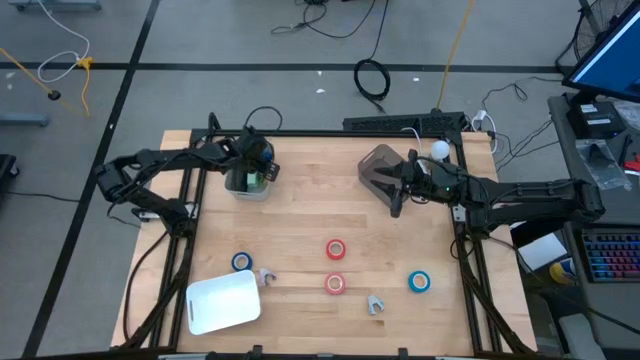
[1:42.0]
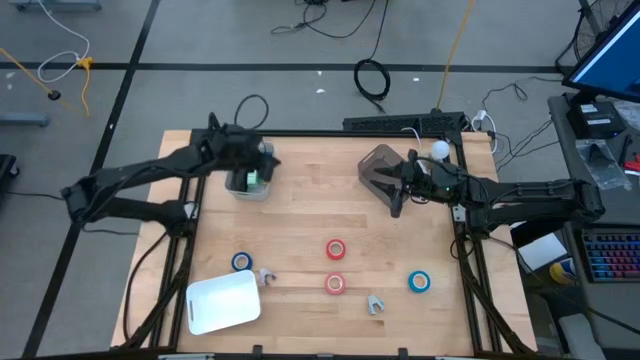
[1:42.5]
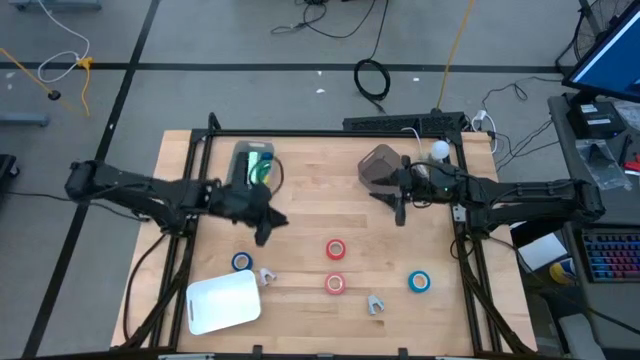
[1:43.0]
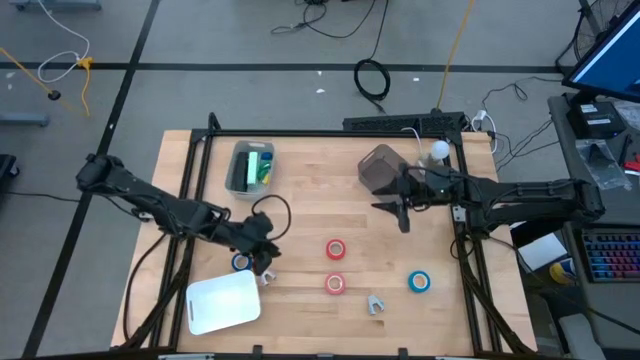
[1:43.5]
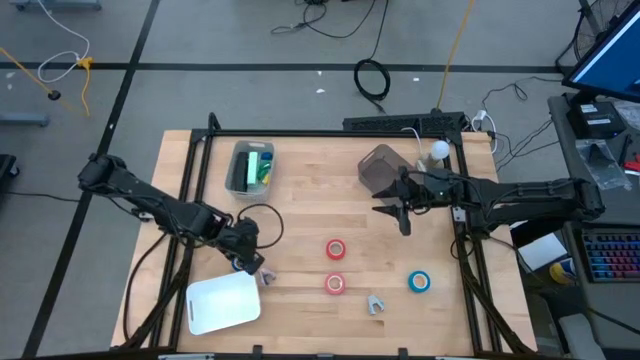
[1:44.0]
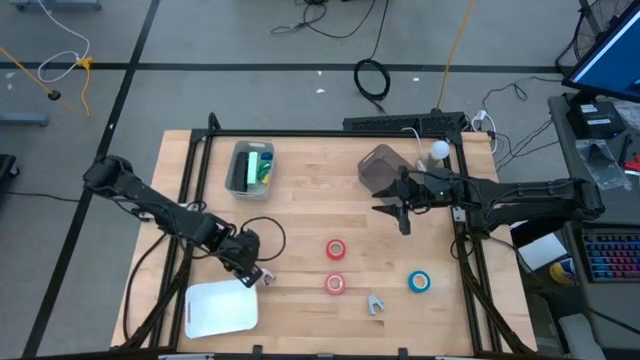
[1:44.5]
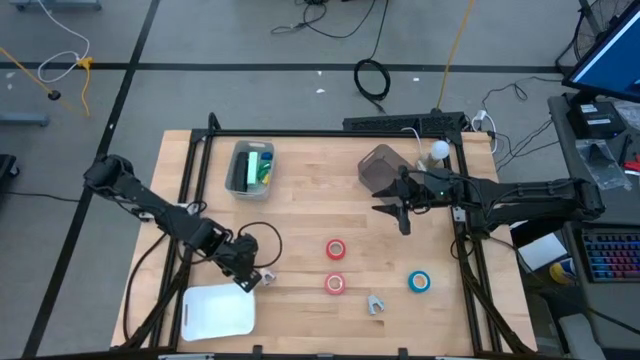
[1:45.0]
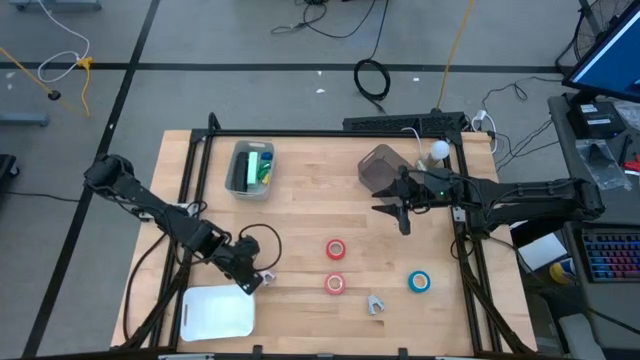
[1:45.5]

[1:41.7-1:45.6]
Task: Pick and place Stapler, Stapler remover, tape
Adjust the white bin

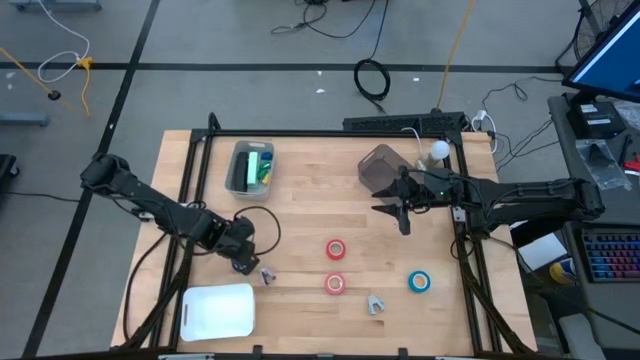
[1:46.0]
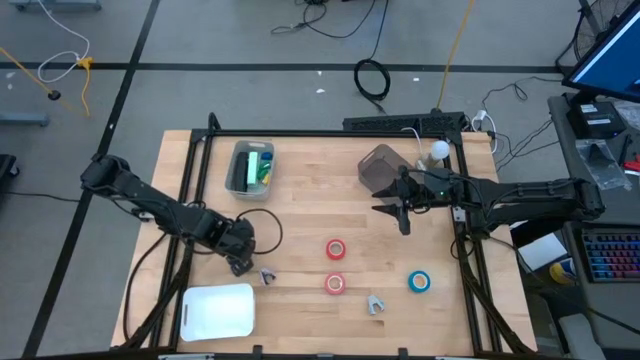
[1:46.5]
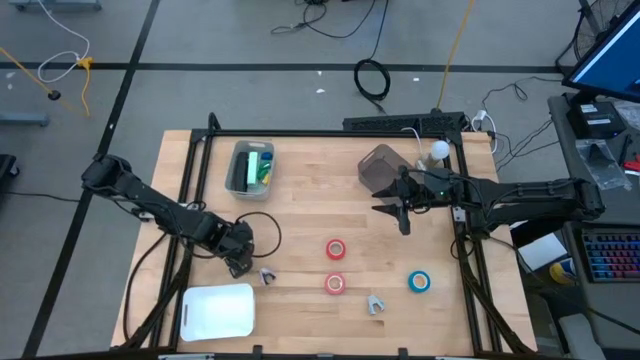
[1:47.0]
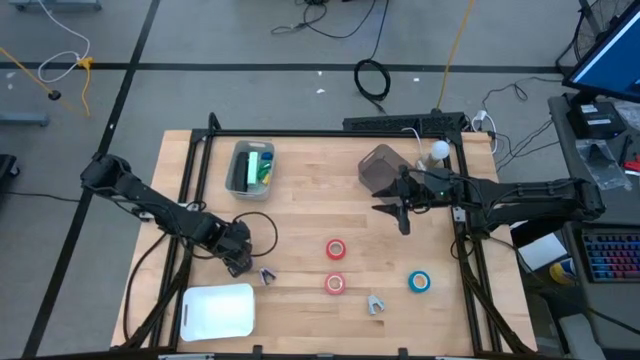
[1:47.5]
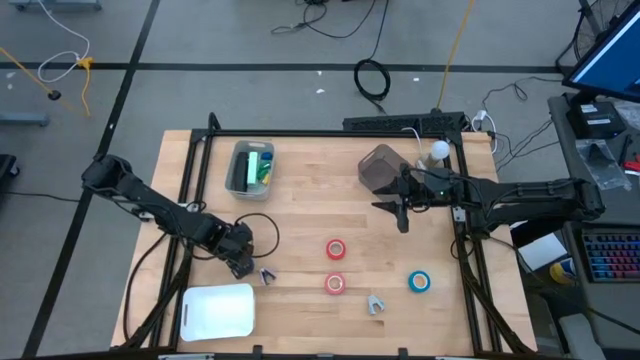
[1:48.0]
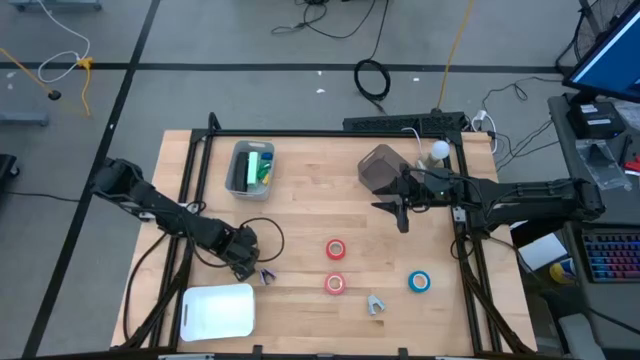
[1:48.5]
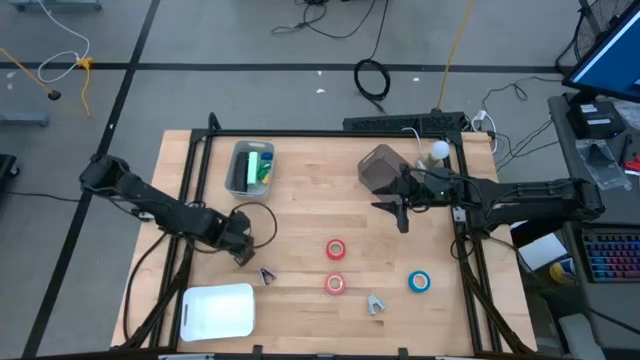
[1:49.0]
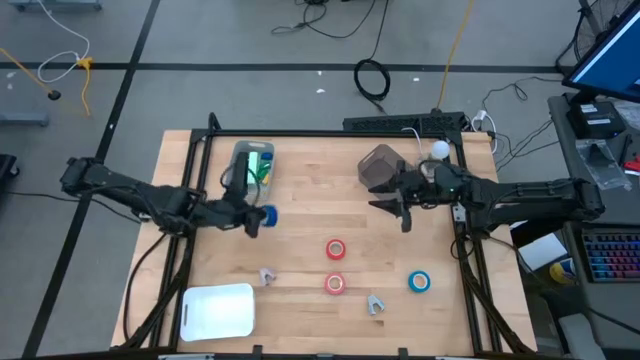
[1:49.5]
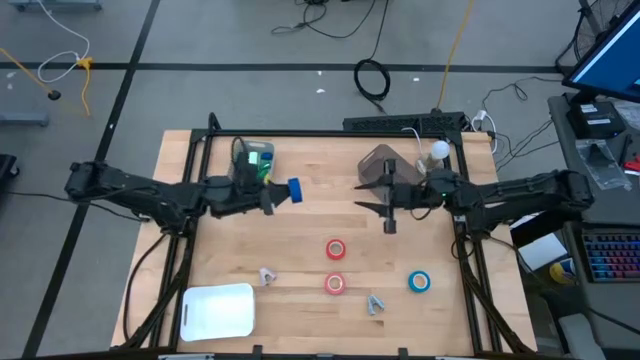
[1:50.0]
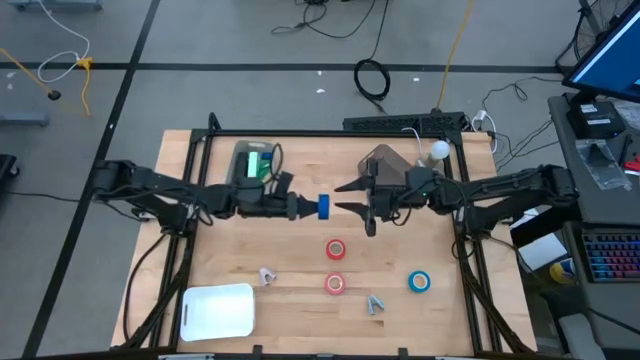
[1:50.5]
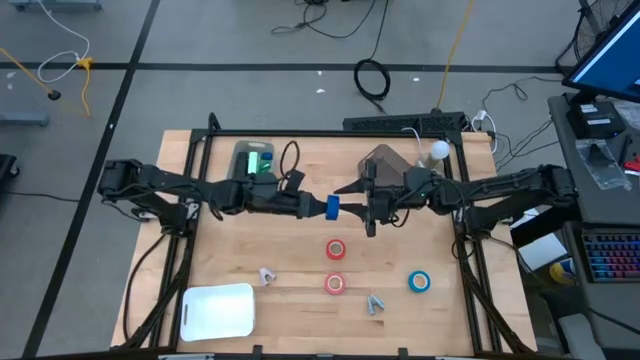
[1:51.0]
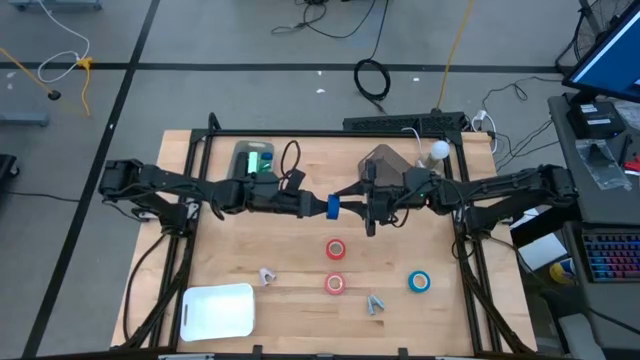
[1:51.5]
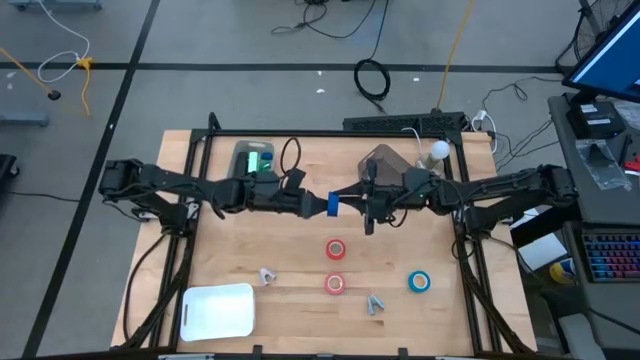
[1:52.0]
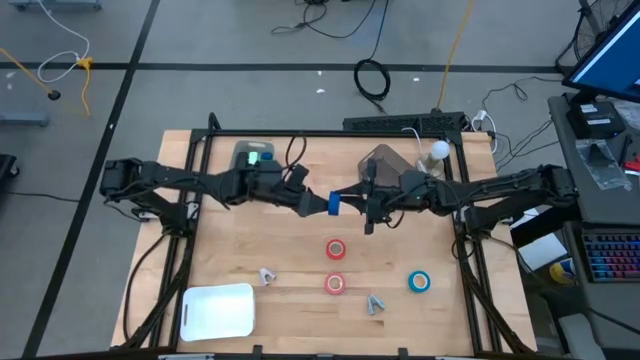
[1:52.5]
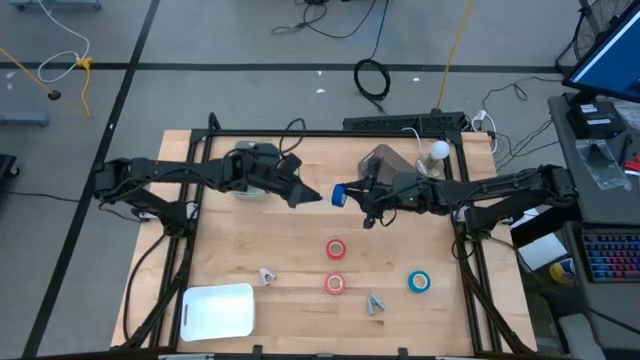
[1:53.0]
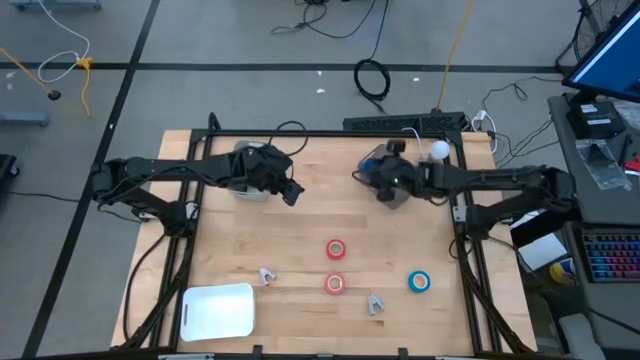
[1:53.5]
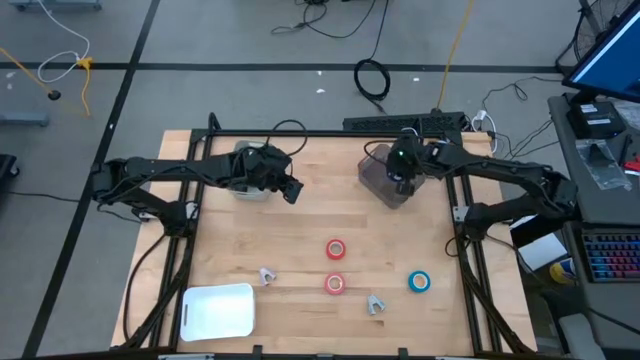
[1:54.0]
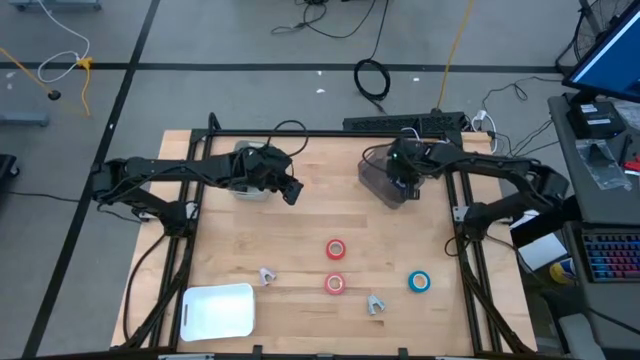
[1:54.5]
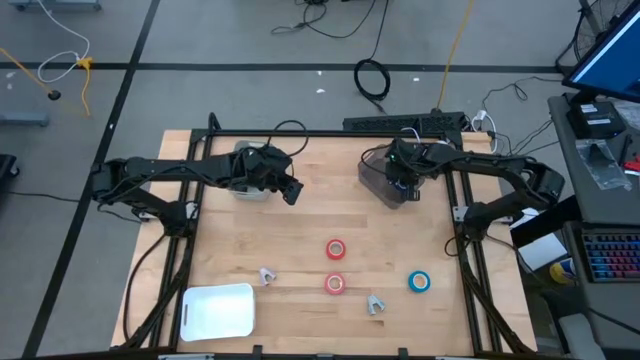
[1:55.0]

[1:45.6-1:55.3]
Put the blue tape into the black bin

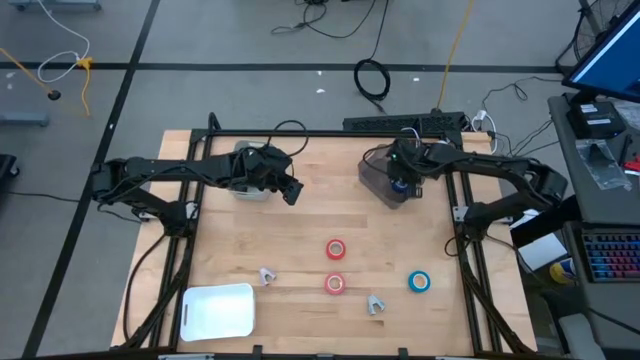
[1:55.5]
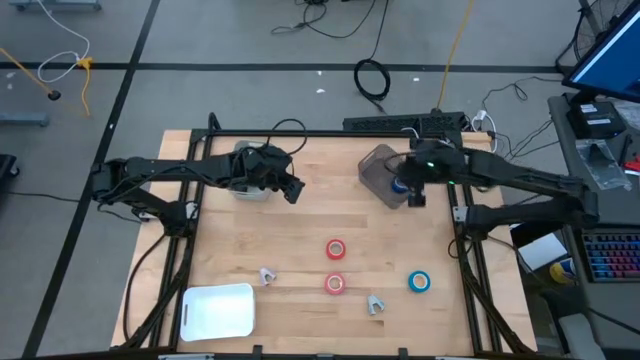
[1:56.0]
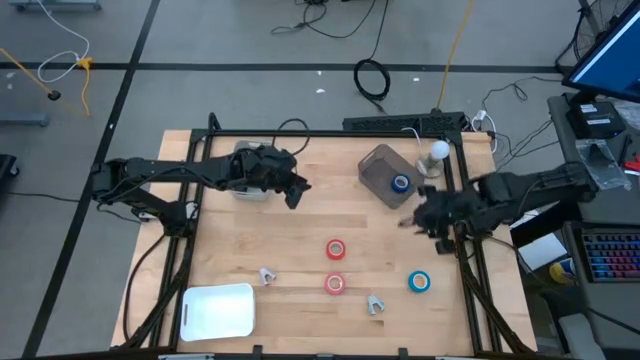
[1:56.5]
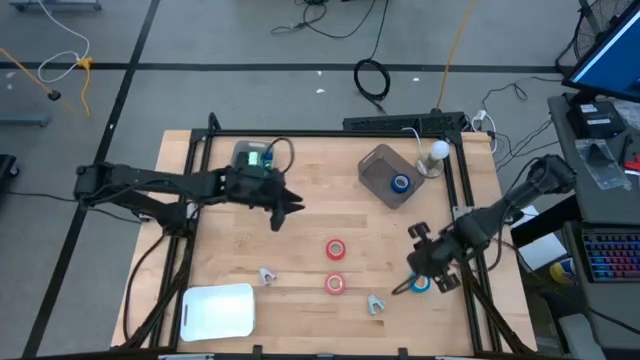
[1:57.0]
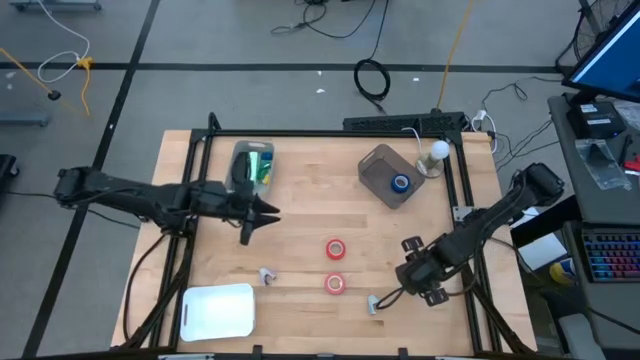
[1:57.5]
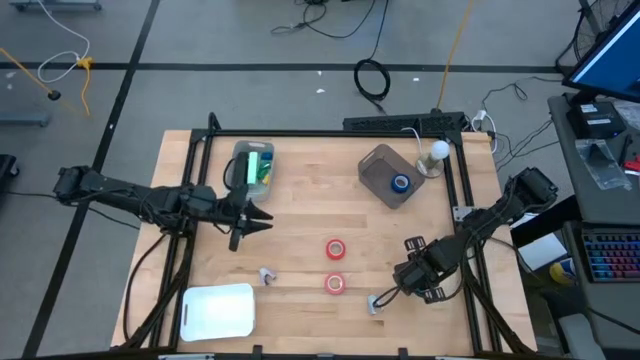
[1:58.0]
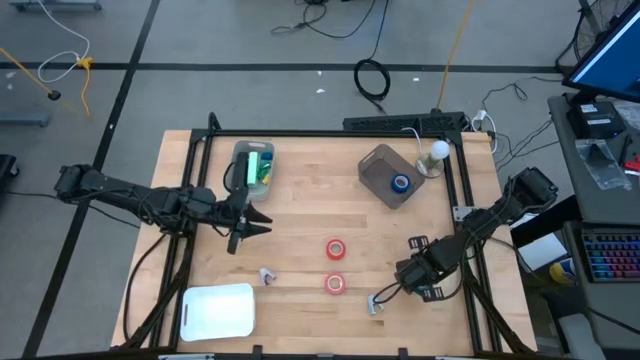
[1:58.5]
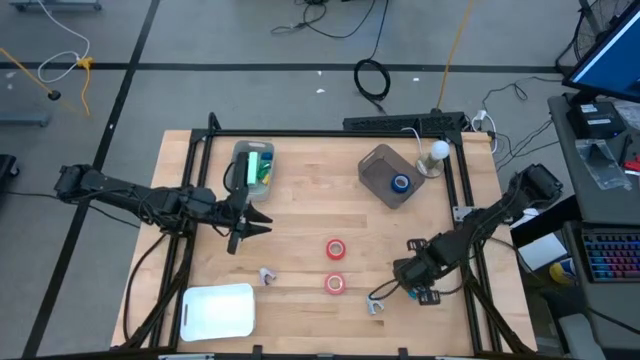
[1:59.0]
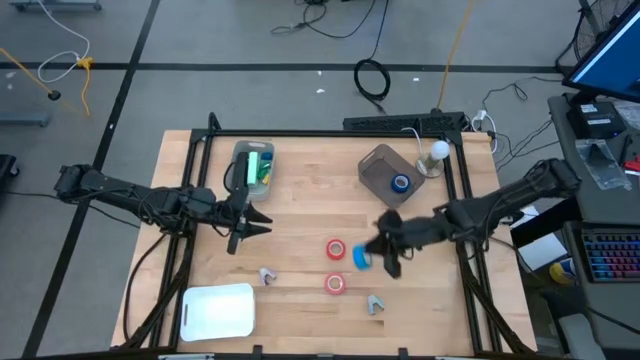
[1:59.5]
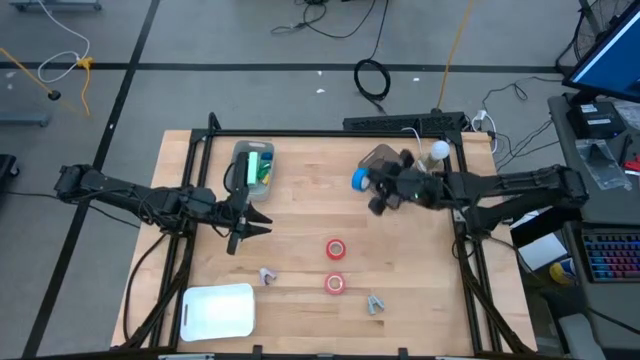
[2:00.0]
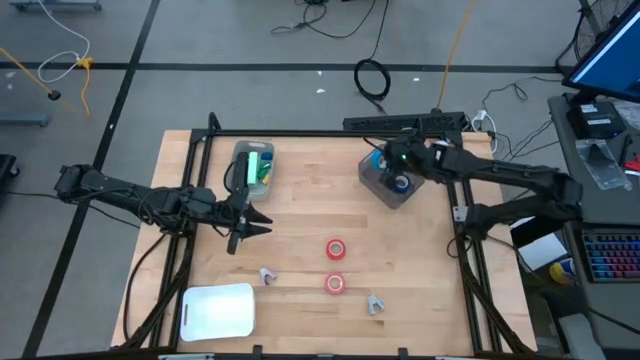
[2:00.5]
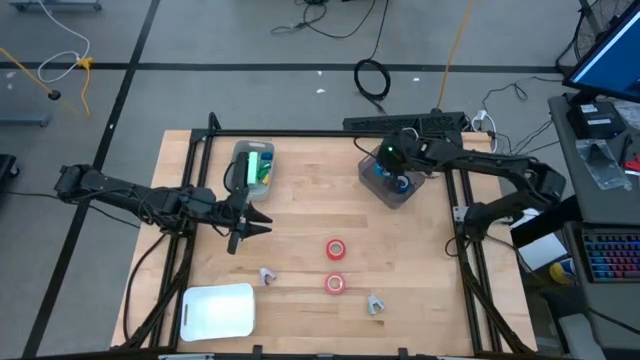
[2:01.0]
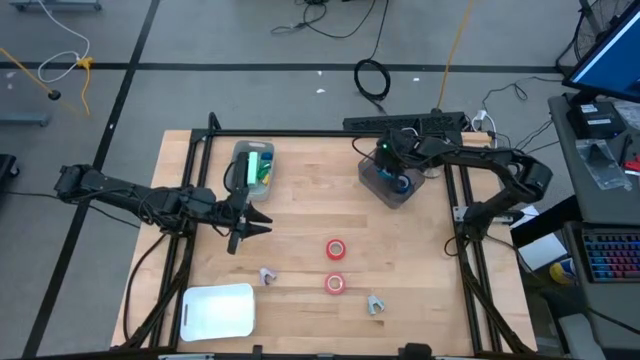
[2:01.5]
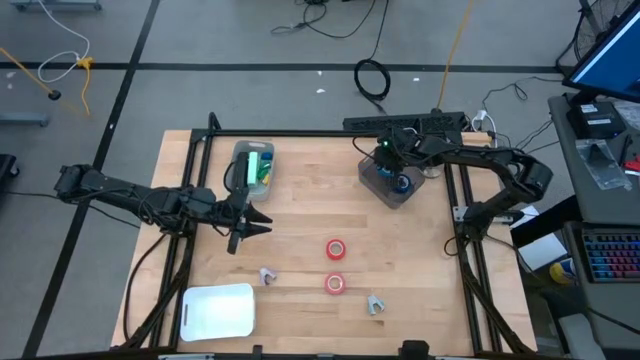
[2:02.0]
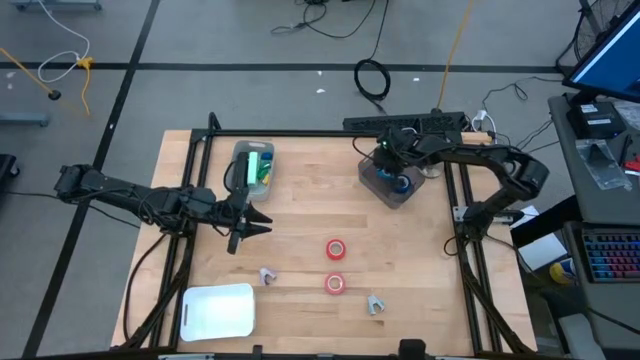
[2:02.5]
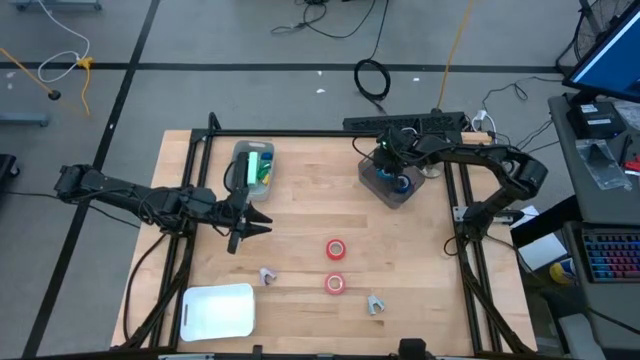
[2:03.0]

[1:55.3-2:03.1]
Put the light blue tape into the black bin
